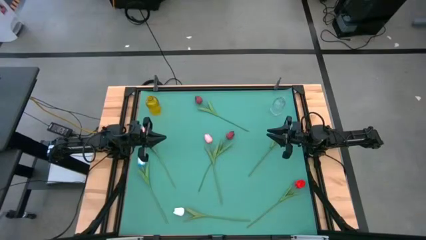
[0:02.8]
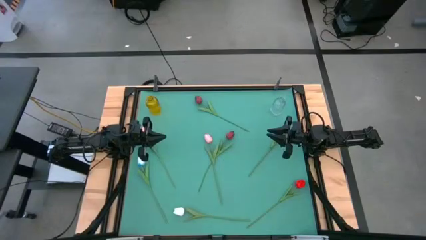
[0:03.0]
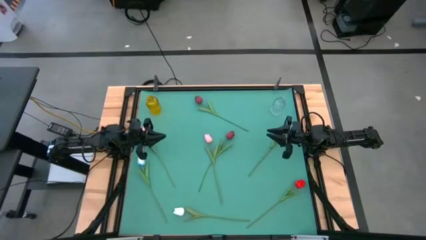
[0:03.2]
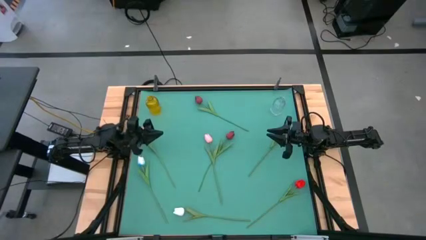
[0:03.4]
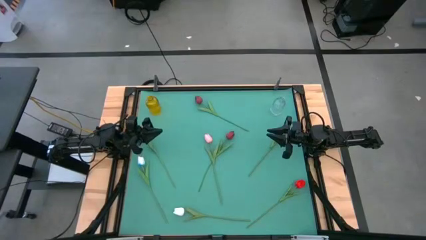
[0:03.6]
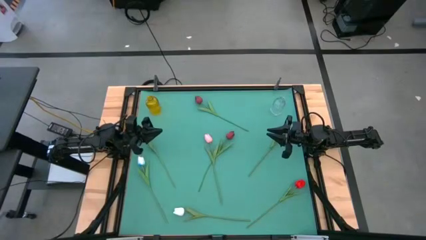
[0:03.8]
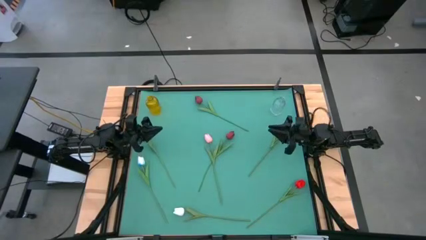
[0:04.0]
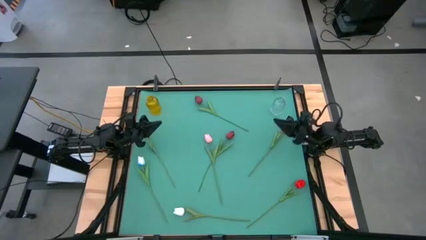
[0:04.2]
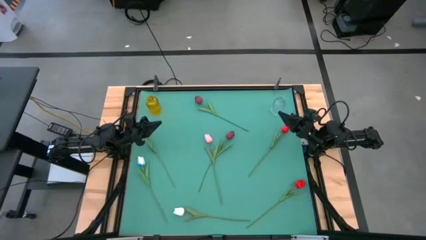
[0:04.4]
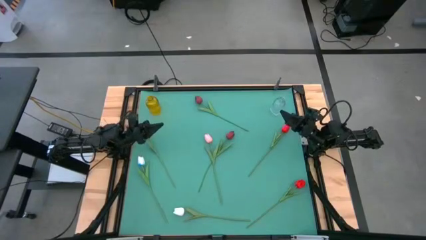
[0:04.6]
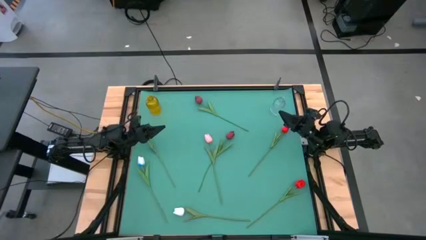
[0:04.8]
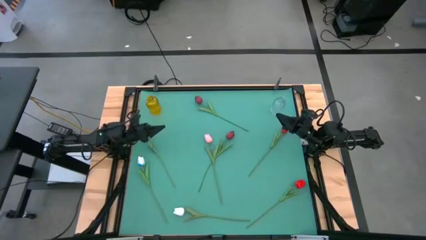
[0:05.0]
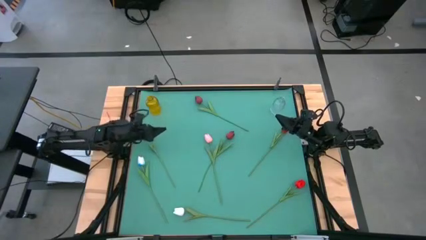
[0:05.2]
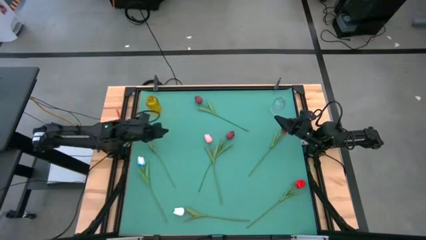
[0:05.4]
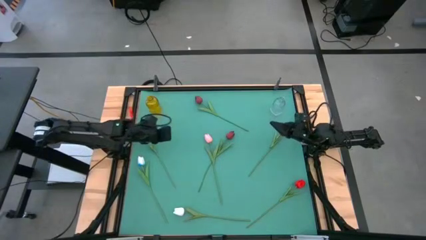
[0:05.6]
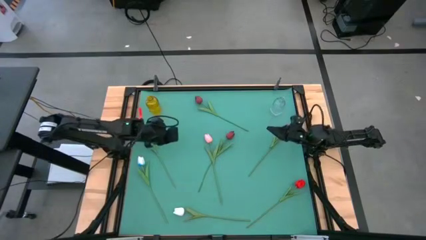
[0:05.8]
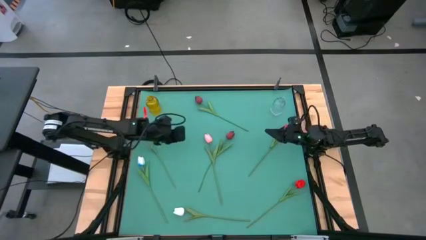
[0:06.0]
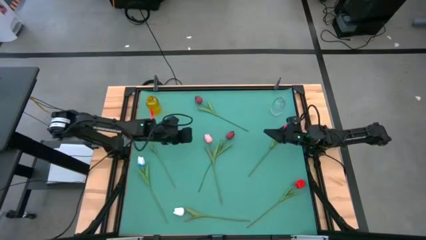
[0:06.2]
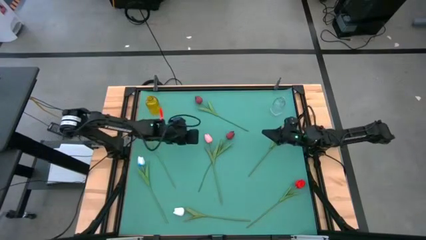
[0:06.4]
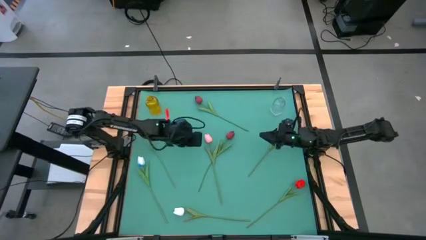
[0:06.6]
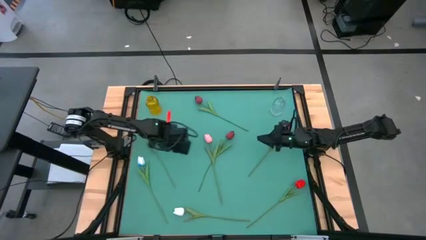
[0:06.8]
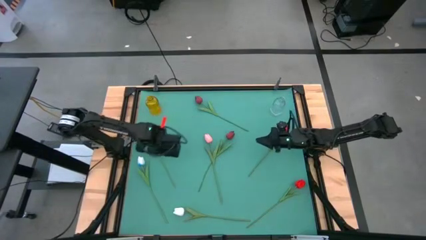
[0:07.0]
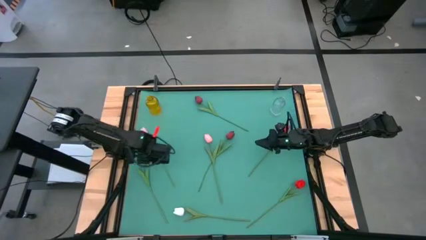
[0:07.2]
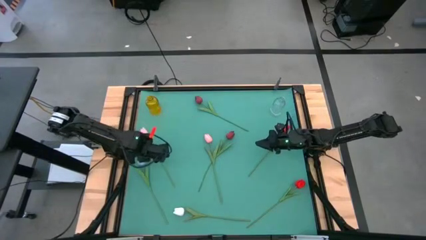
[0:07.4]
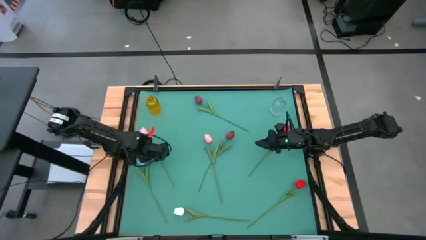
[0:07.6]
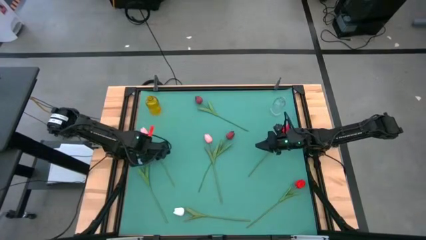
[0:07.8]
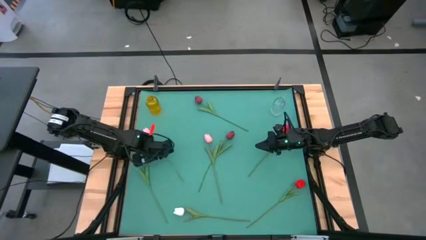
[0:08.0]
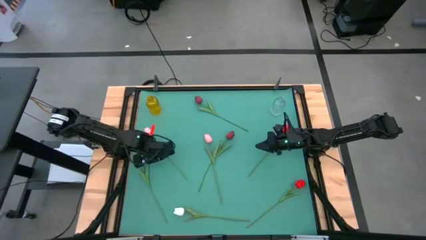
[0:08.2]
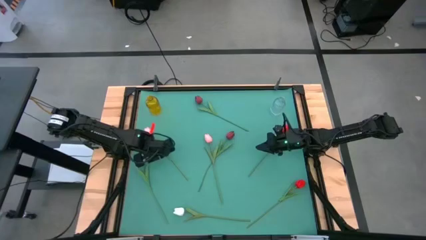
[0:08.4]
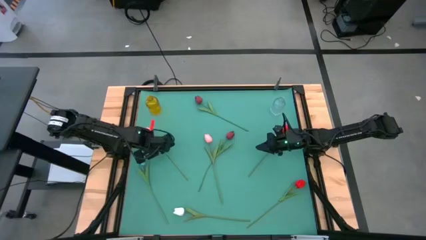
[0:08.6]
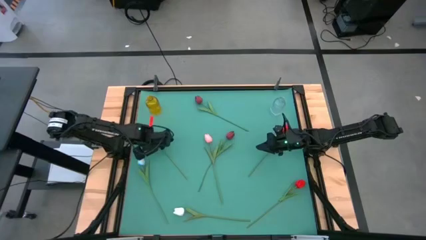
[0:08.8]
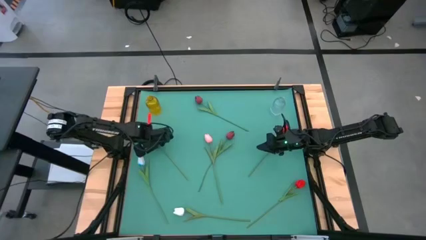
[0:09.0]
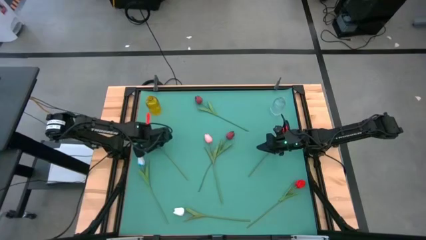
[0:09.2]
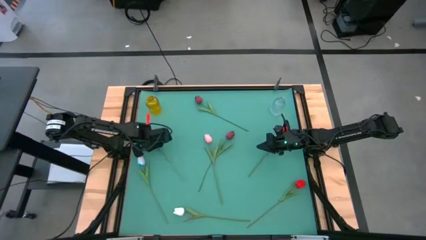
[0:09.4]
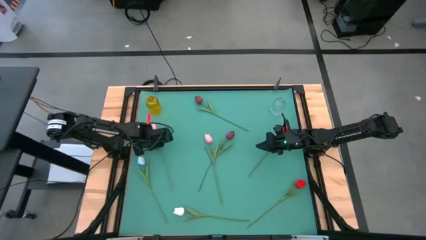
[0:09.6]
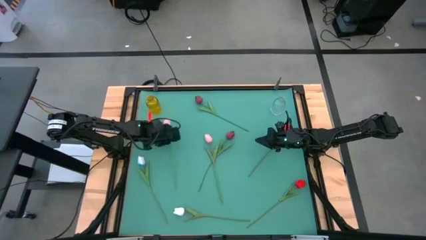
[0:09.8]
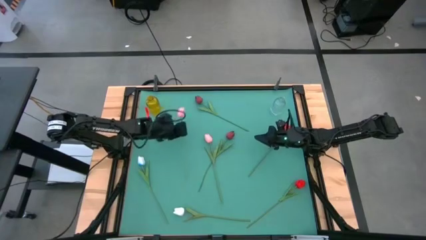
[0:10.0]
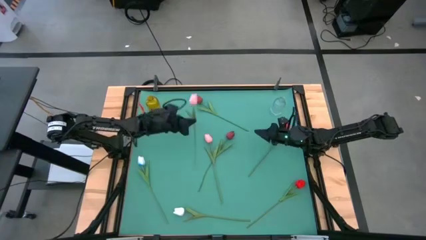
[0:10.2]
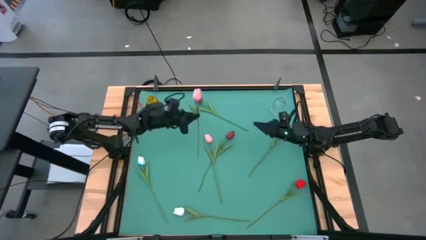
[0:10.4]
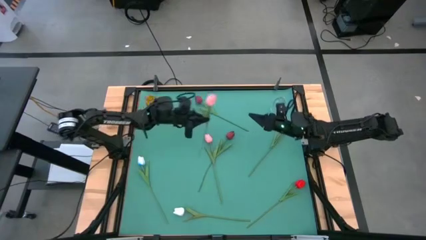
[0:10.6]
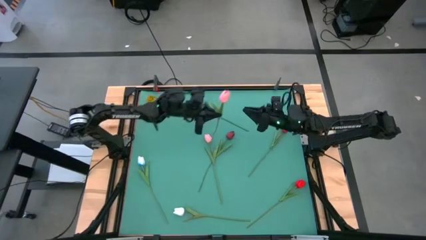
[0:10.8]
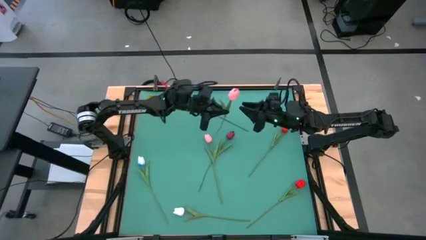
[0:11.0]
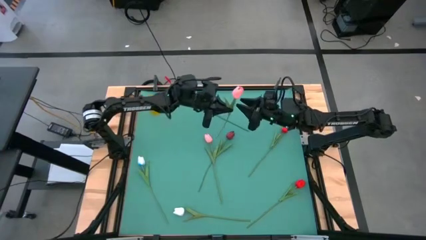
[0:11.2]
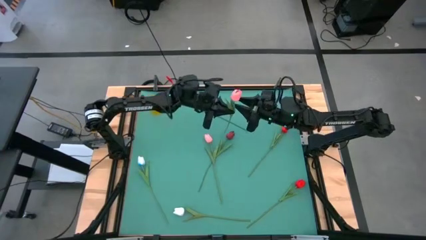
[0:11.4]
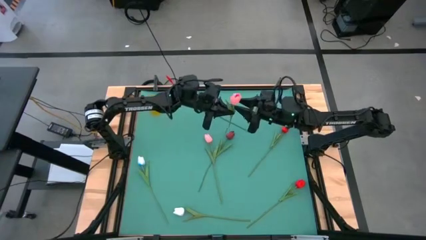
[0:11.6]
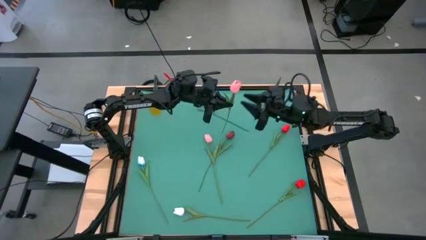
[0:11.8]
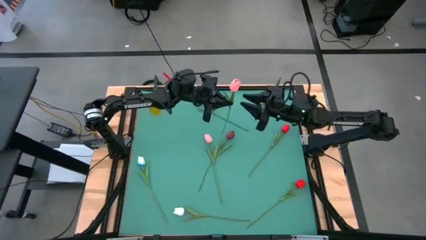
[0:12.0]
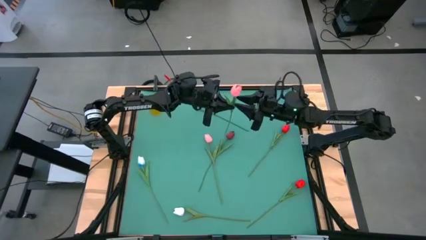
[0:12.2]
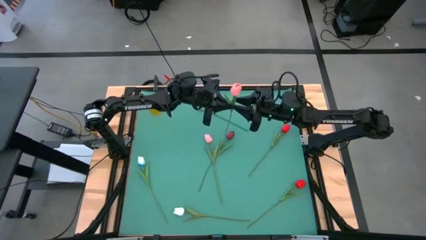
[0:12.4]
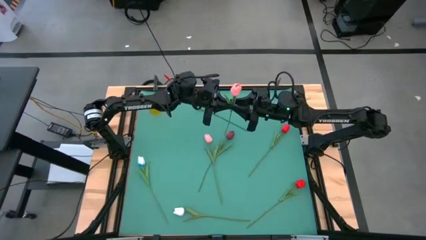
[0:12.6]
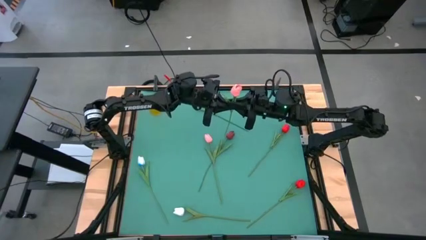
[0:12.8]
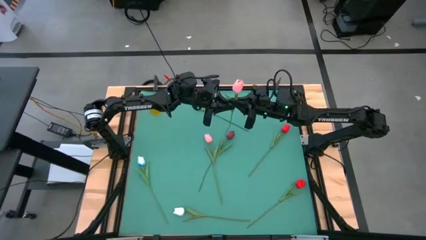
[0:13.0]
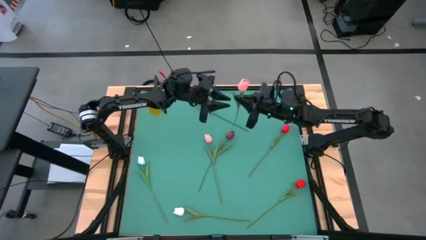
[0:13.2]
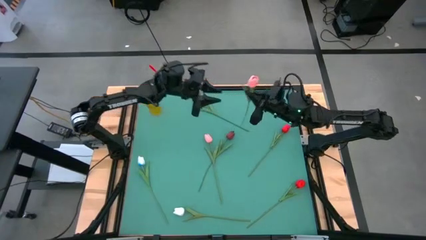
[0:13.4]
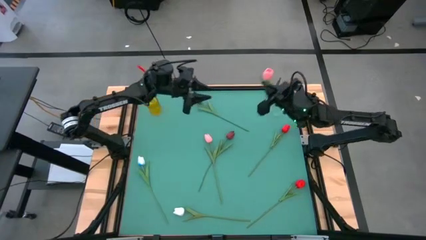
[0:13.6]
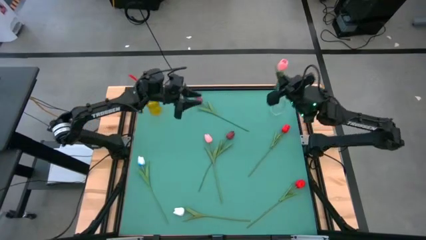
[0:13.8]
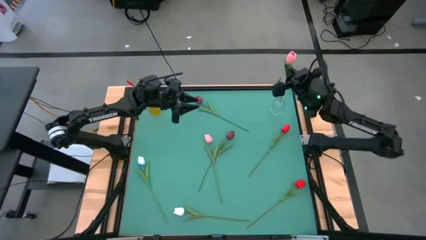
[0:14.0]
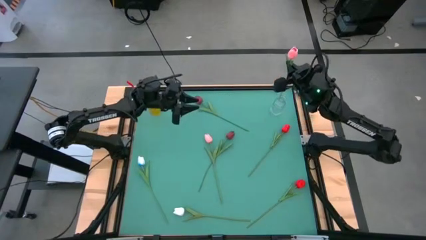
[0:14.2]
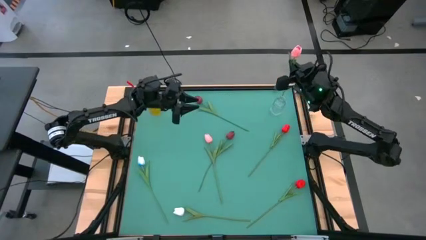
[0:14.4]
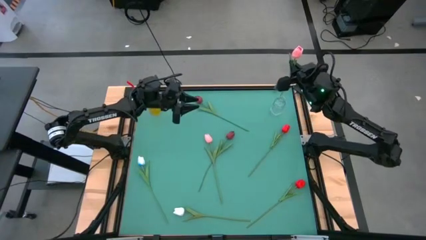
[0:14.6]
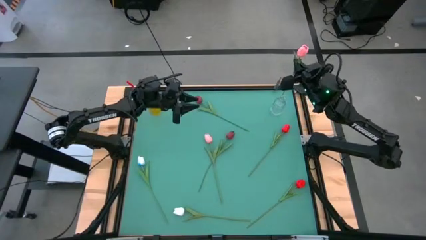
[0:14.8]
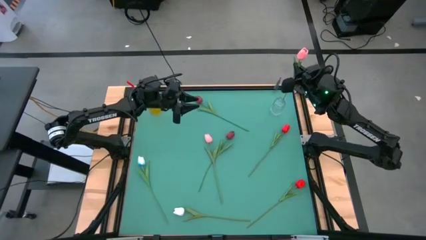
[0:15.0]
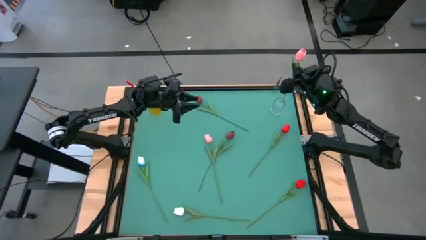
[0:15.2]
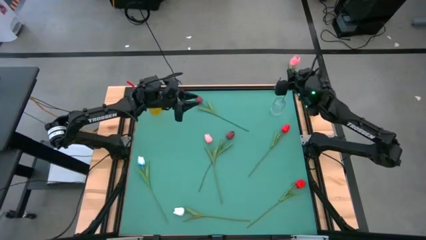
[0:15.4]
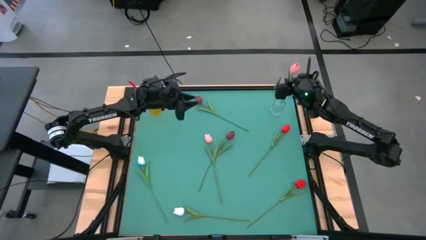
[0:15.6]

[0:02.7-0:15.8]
Task: Sort flowers into vase by color
Put the left pink flower into the transparent vase
